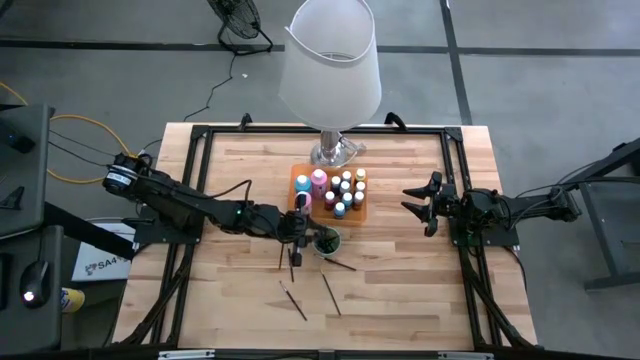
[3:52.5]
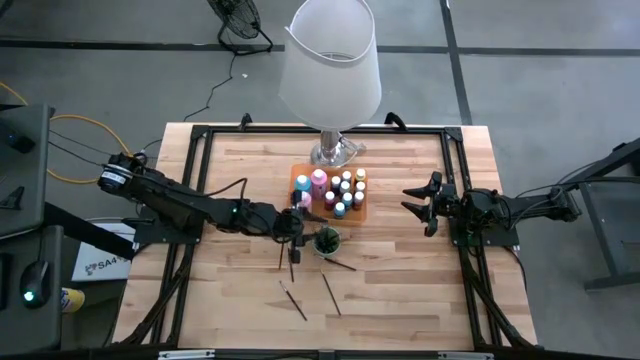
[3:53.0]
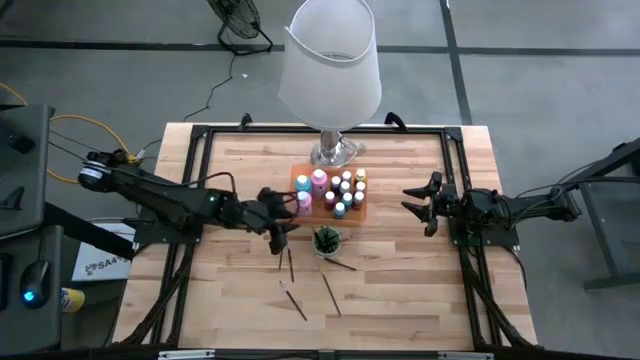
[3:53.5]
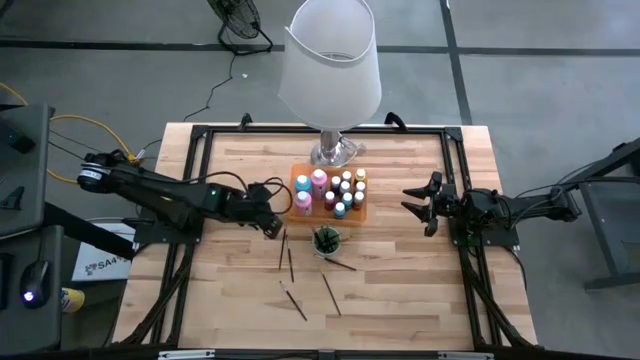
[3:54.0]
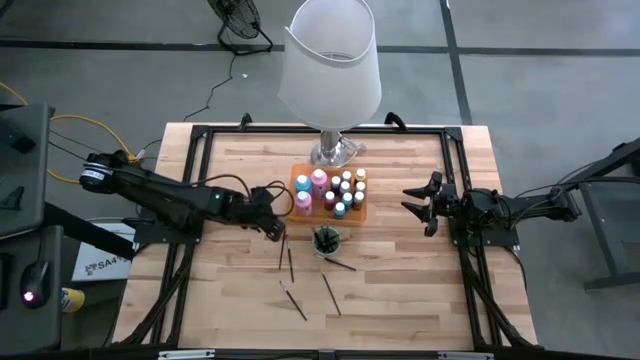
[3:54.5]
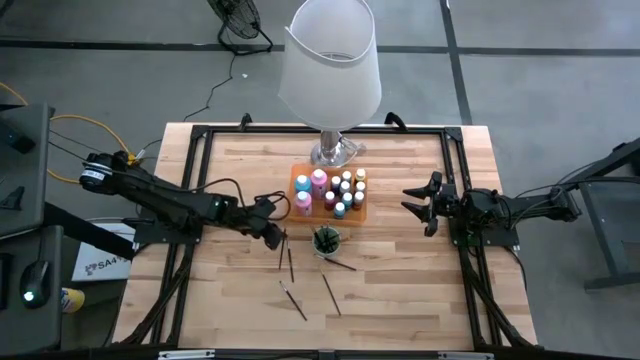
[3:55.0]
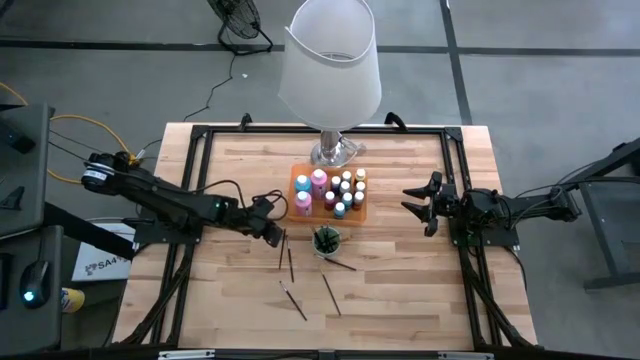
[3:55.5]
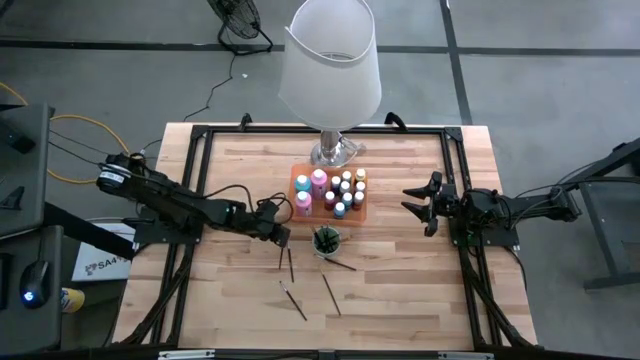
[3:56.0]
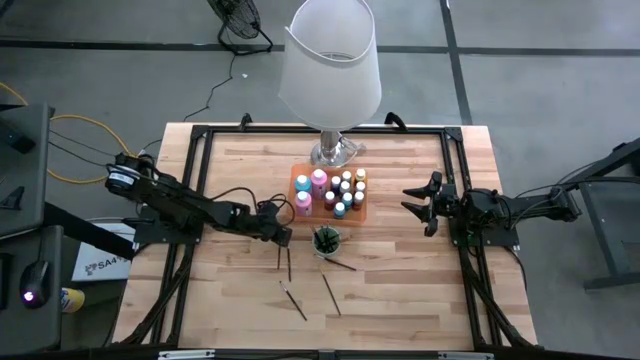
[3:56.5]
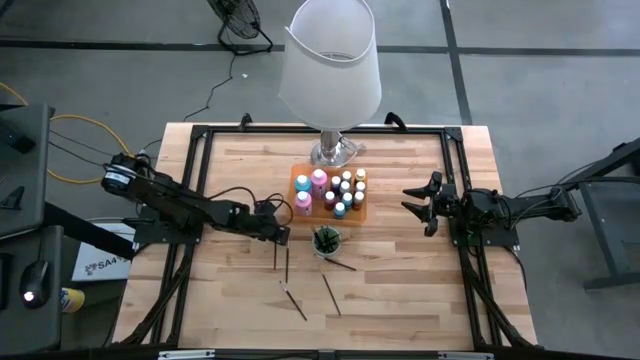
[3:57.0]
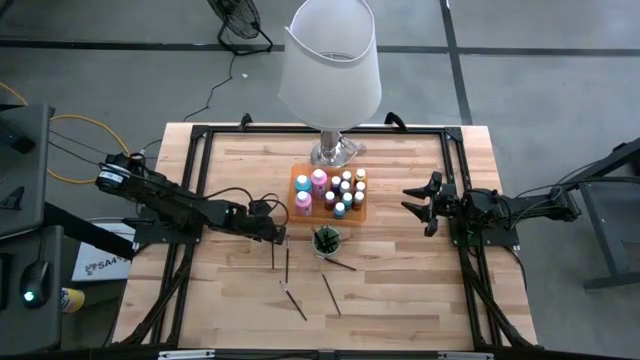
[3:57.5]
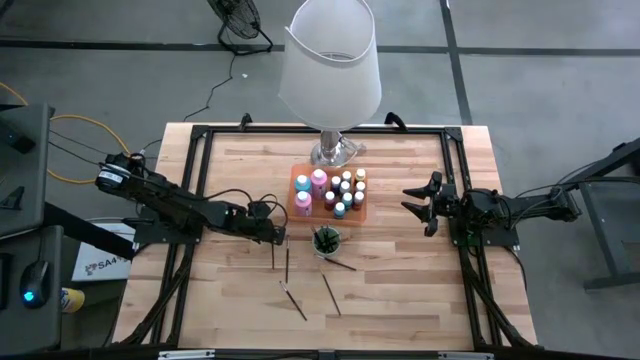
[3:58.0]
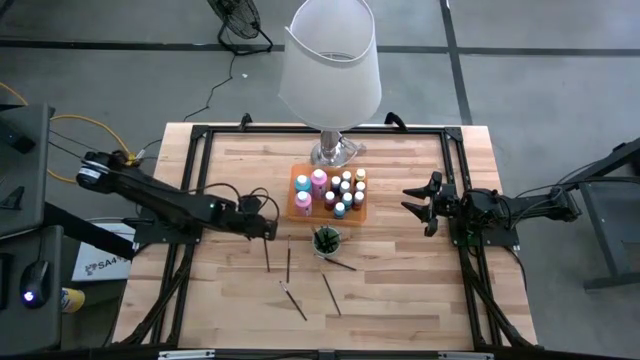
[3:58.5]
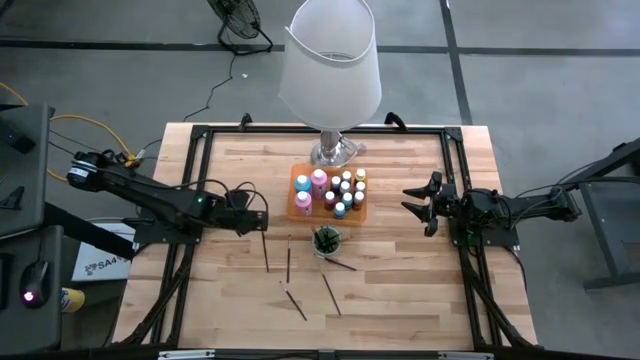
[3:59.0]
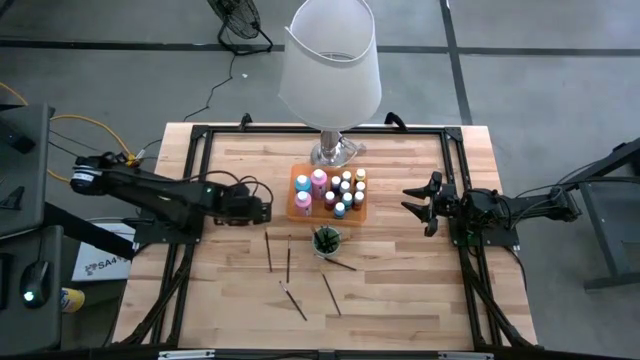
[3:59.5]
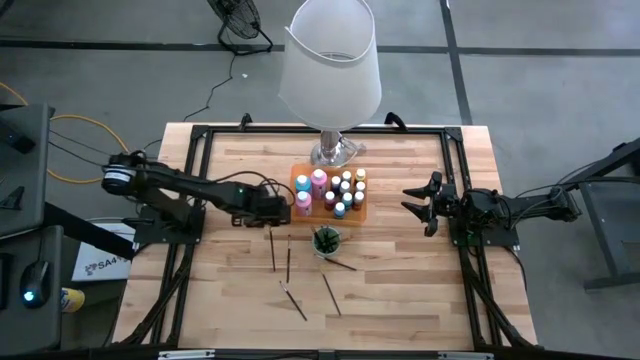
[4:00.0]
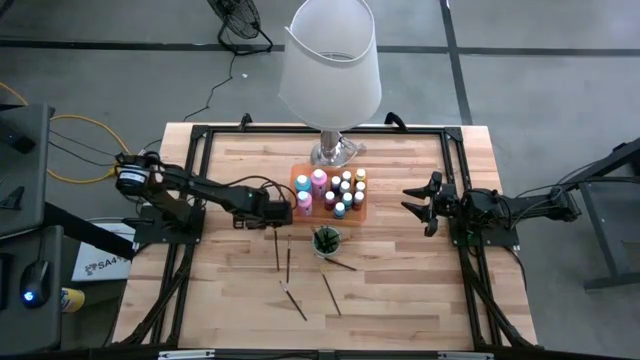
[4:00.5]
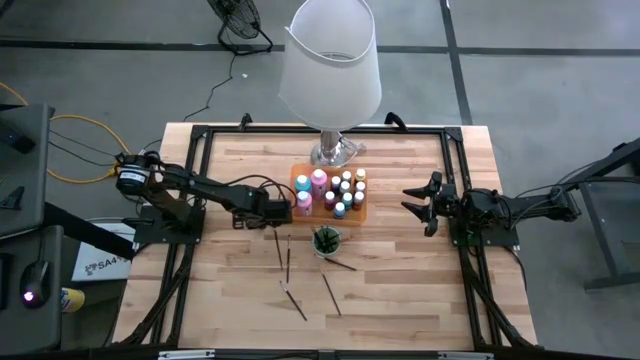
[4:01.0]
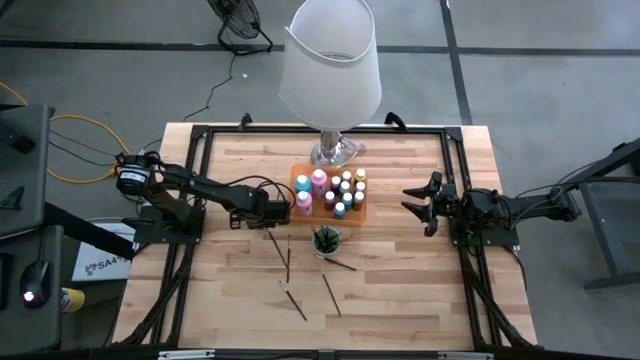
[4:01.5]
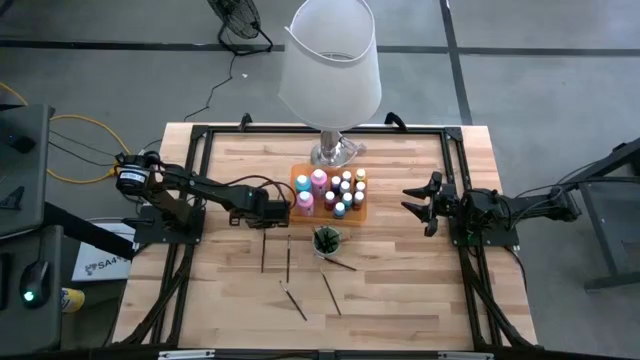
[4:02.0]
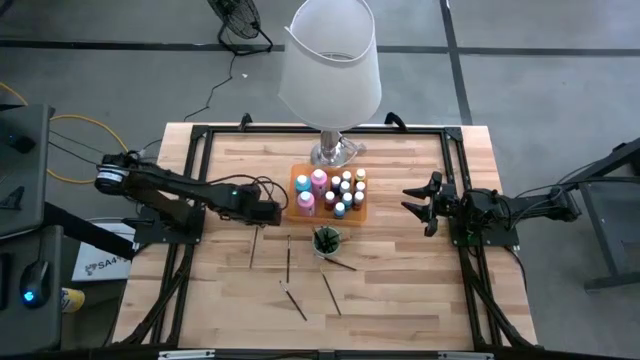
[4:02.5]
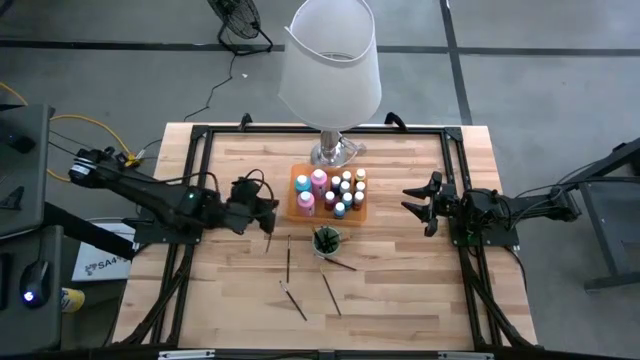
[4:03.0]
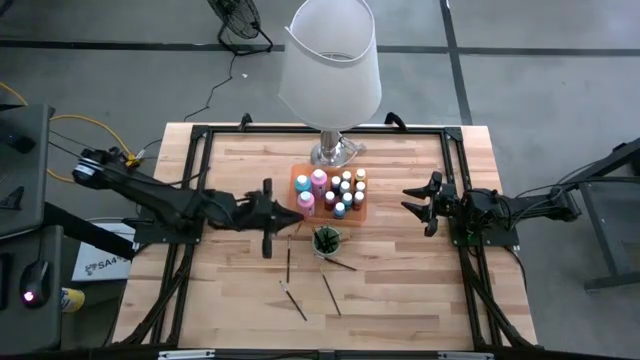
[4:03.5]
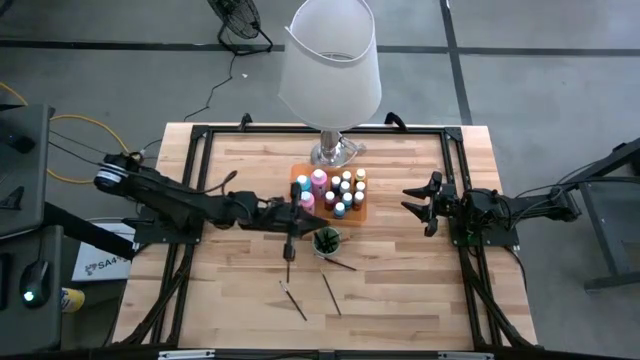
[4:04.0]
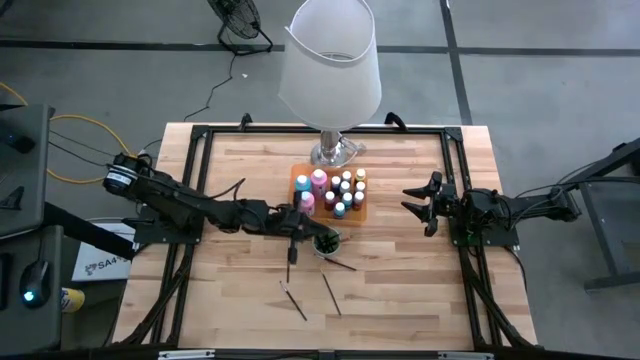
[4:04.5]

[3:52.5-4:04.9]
Task: Pick & Place Paint Supplies
Put the orange paintbrushes into the green cup

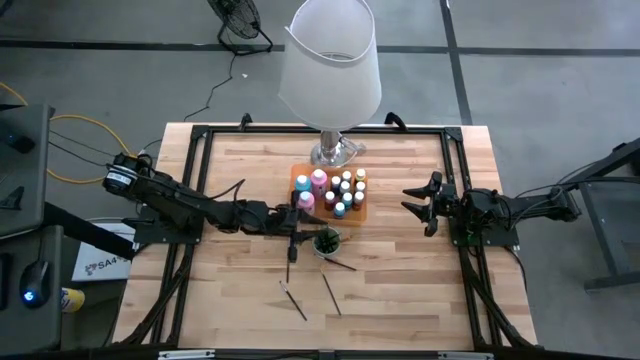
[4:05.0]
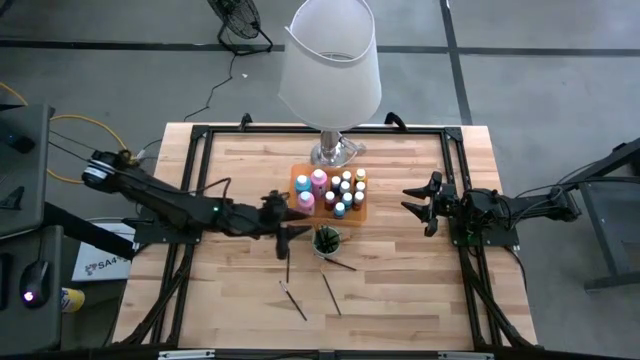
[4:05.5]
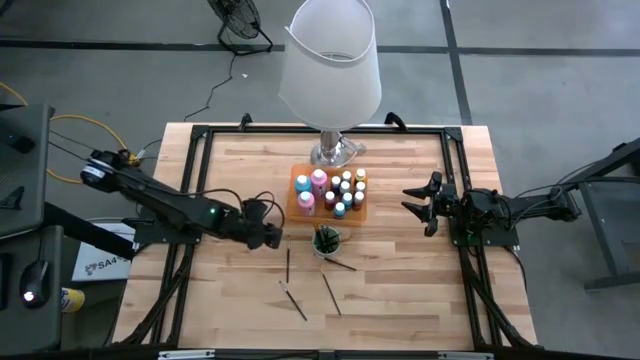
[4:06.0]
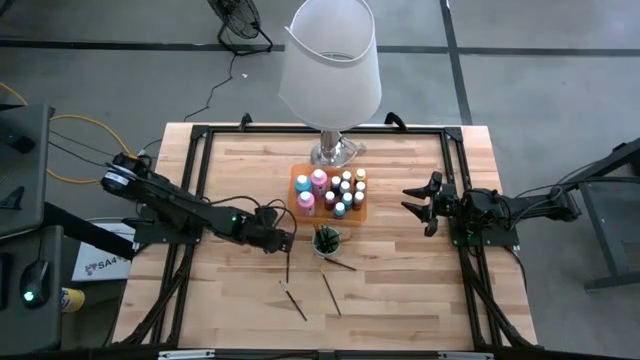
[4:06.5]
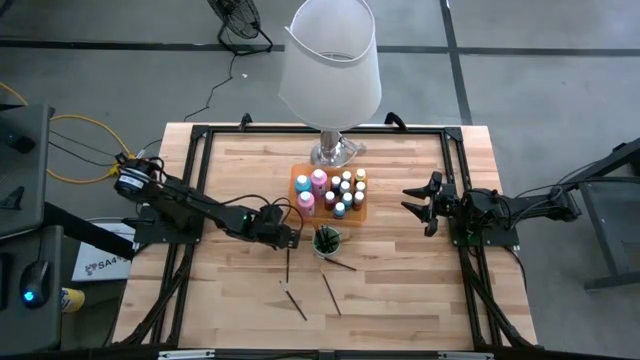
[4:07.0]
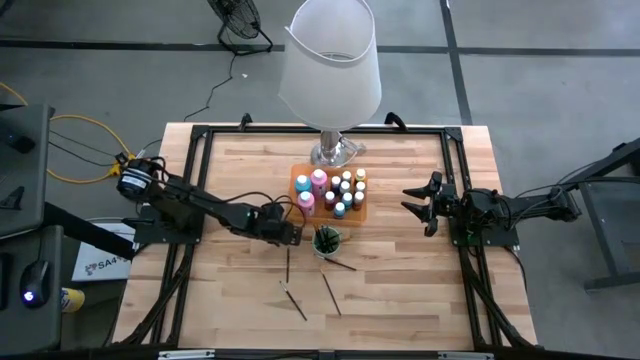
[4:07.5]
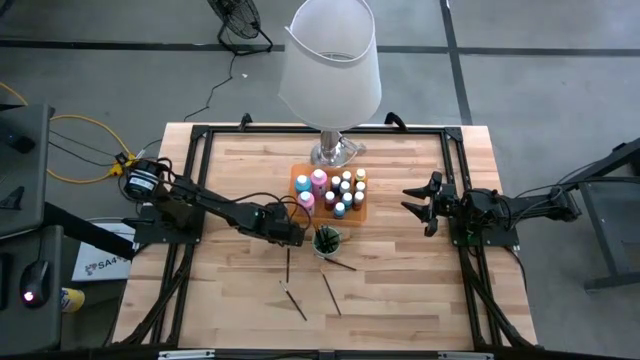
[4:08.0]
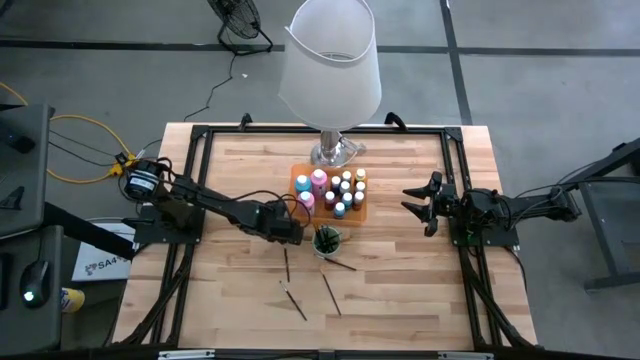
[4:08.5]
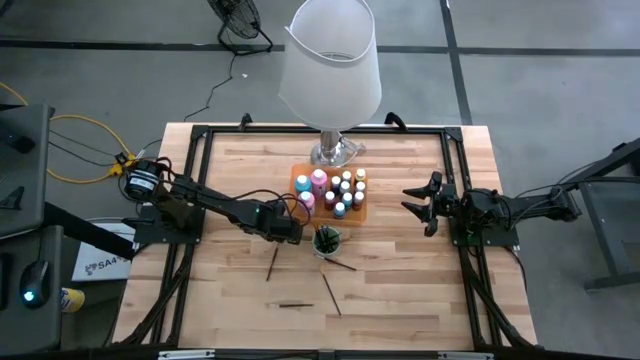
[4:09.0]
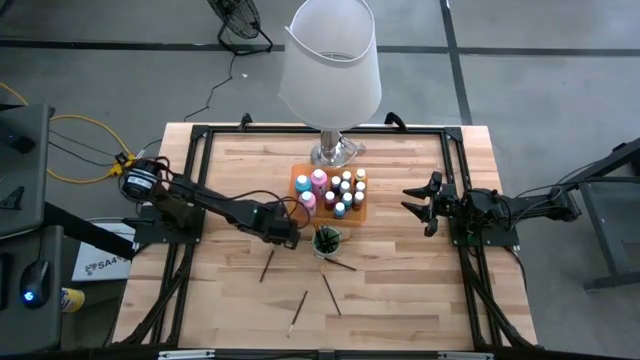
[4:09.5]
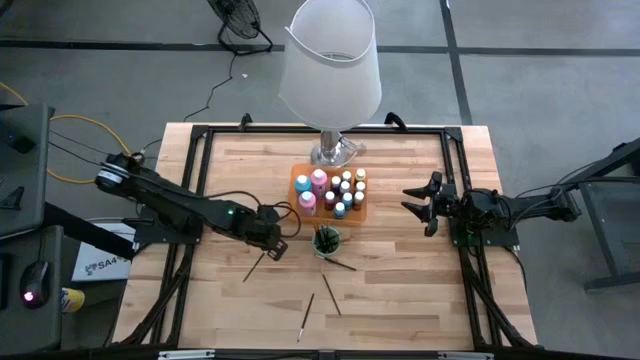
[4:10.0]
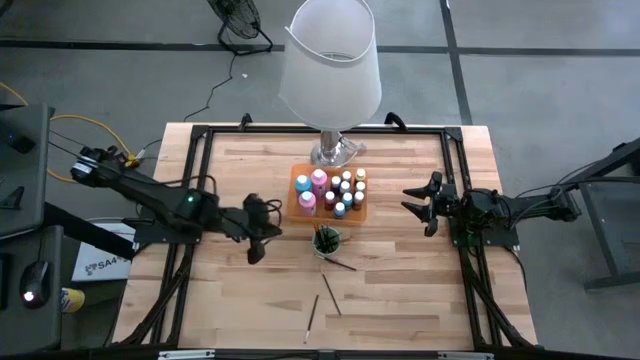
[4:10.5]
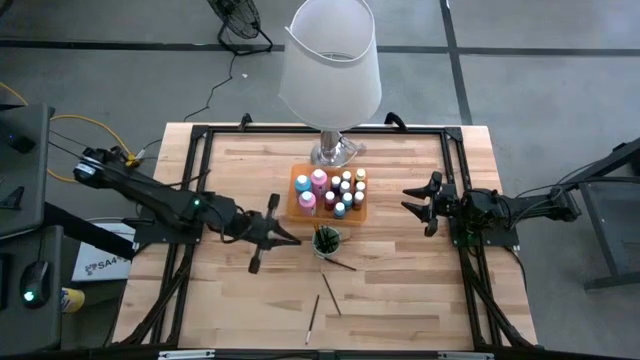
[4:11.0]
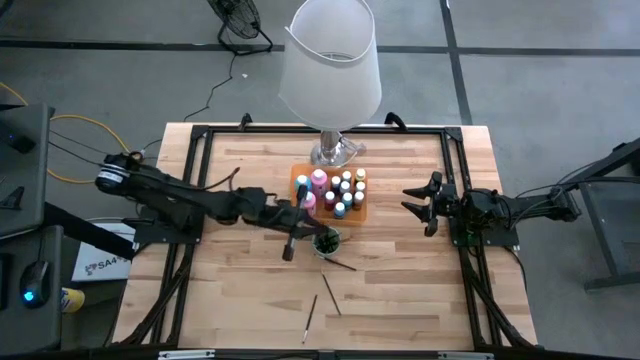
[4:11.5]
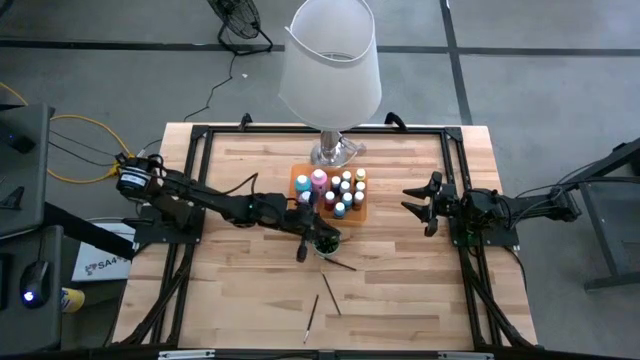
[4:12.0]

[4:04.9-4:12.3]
Put the gray paintbrushes into the green cup

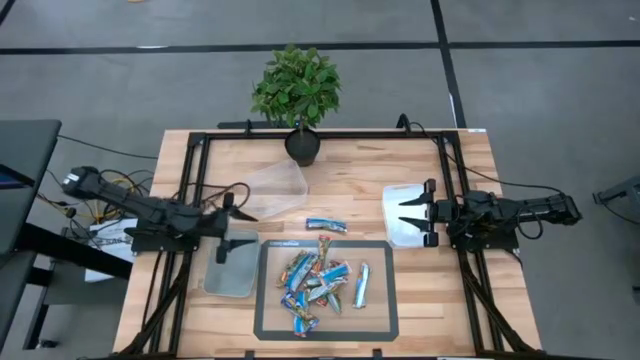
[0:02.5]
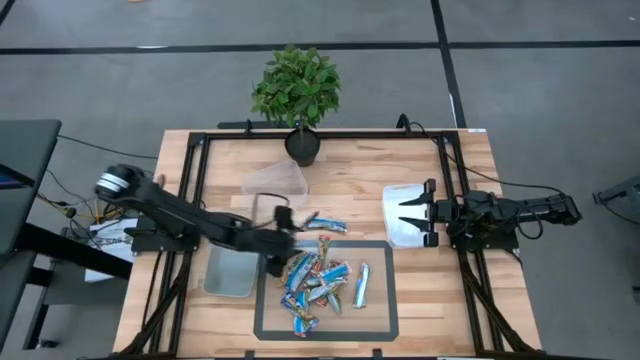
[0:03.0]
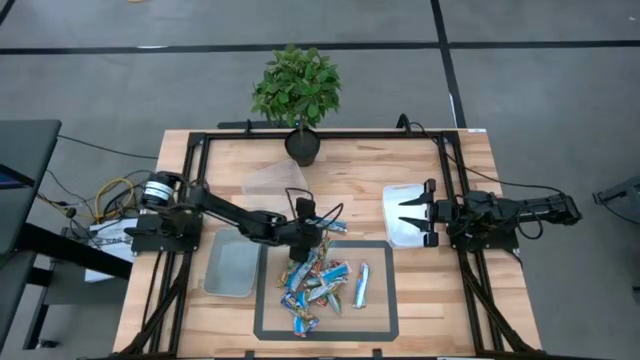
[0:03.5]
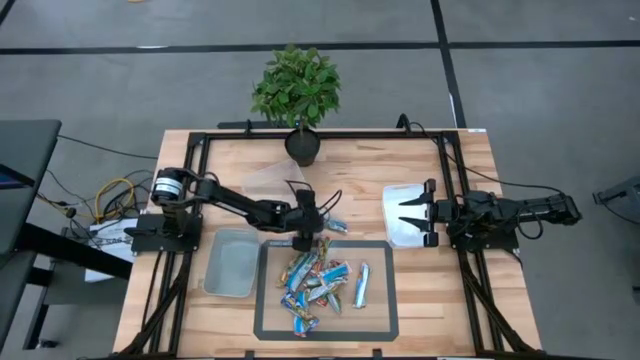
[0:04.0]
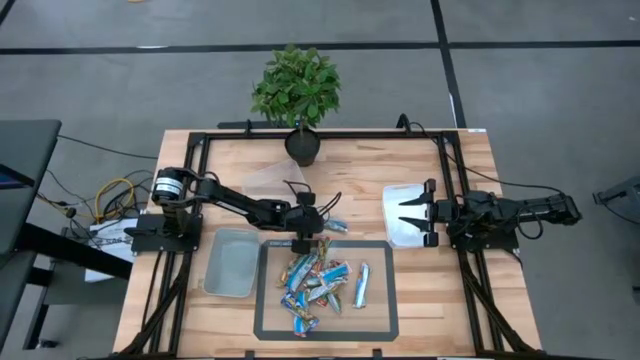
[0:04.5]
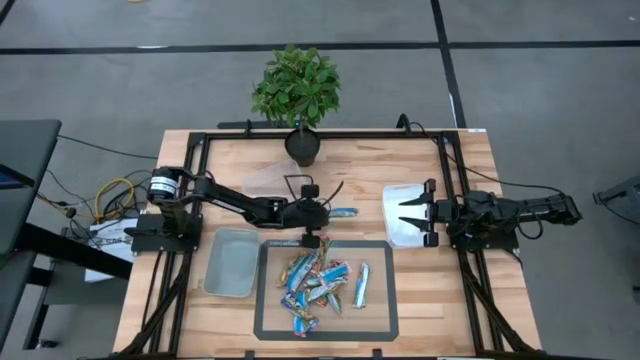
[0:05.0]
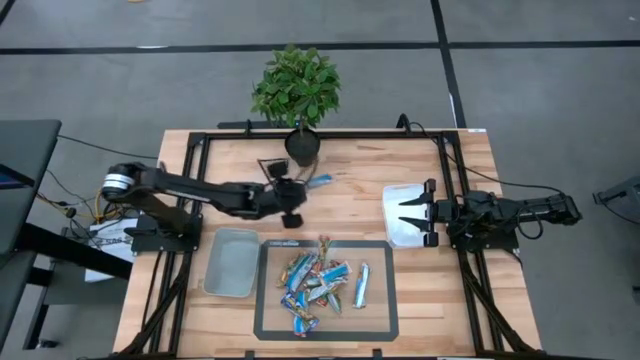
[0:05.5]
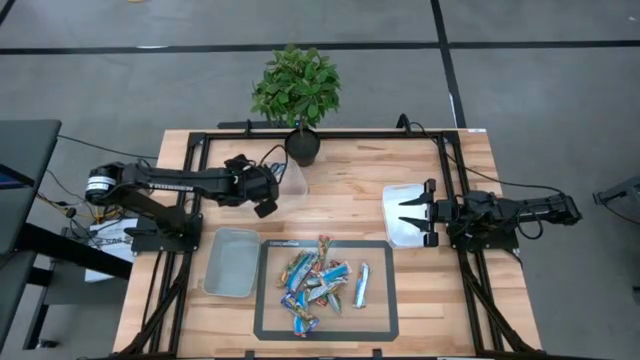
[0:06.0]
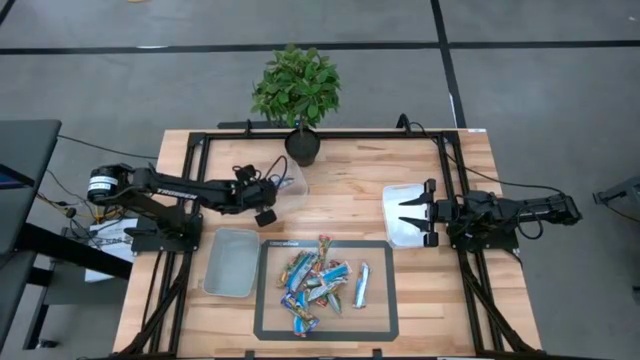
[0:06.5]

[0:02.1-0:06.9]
Task: Pick and place Granola Bars by type
Put the blue granola bar into the transparent bin
